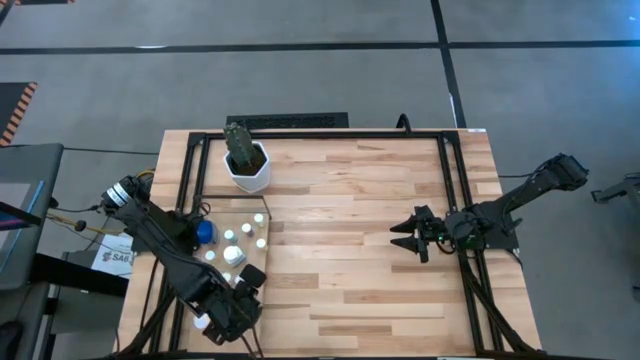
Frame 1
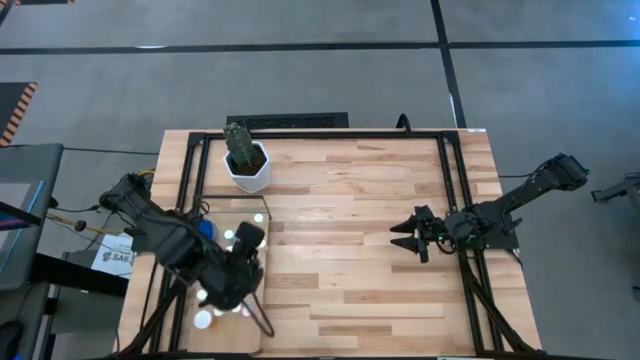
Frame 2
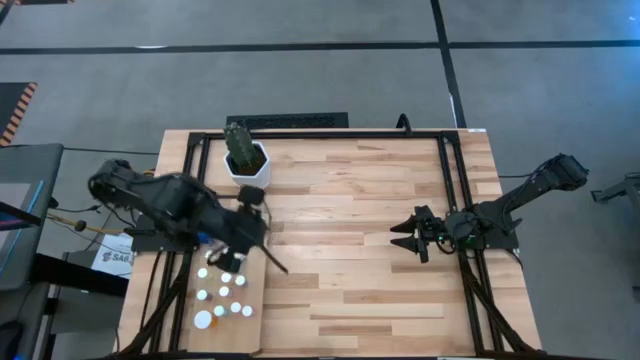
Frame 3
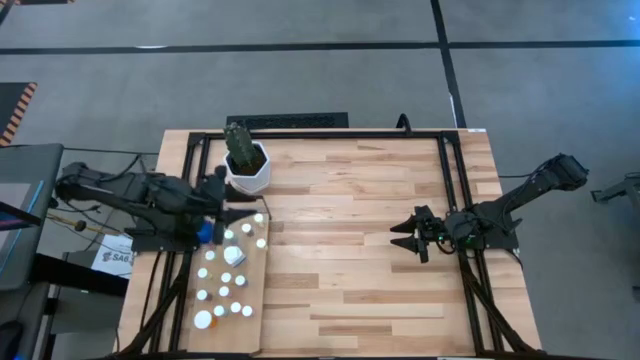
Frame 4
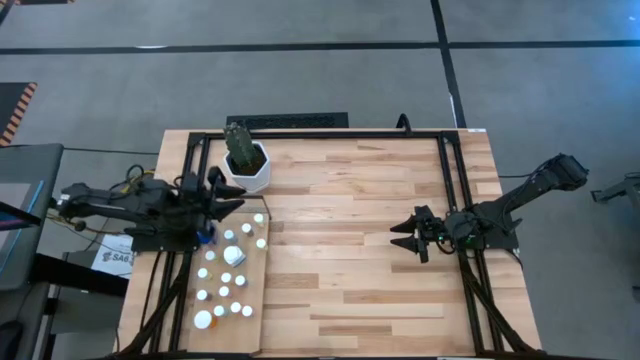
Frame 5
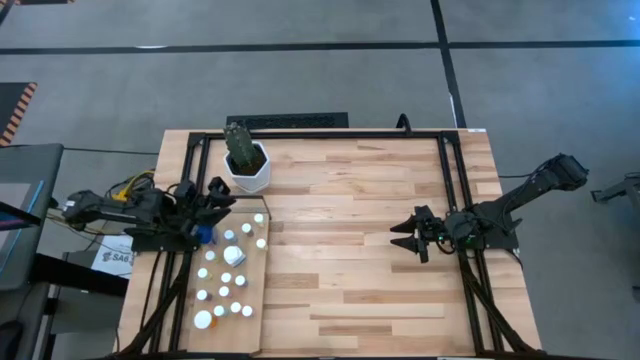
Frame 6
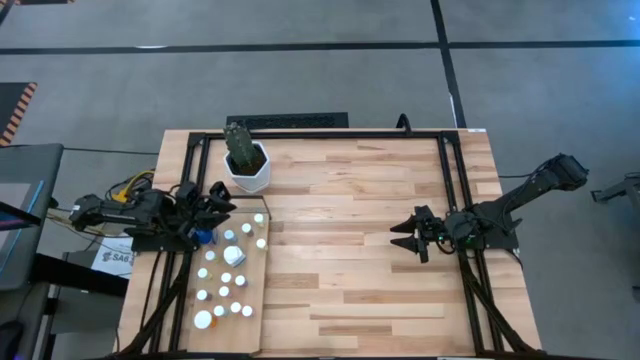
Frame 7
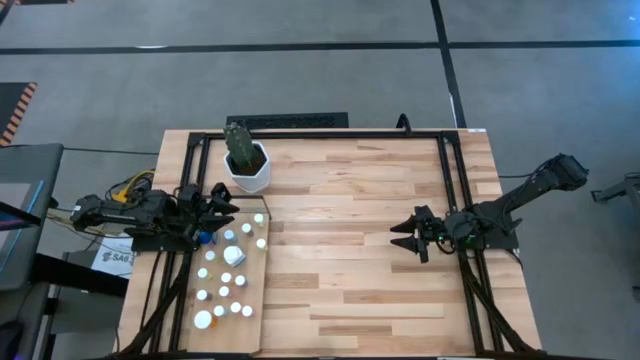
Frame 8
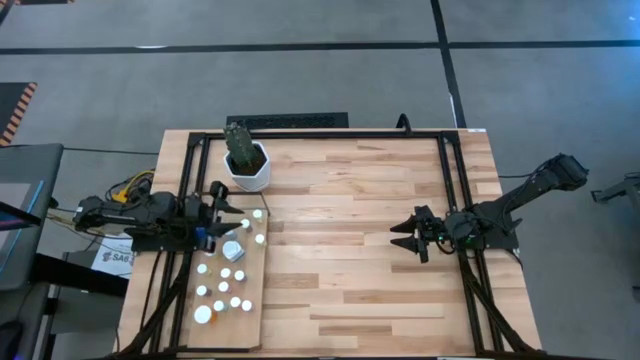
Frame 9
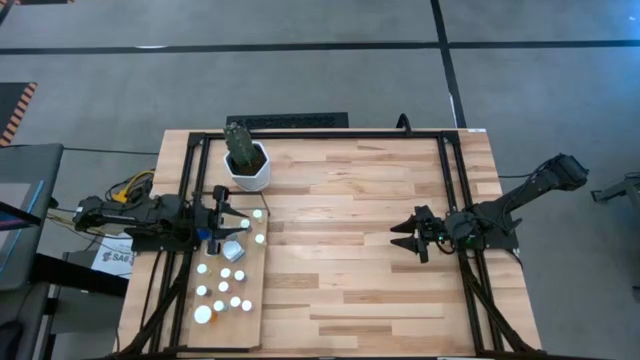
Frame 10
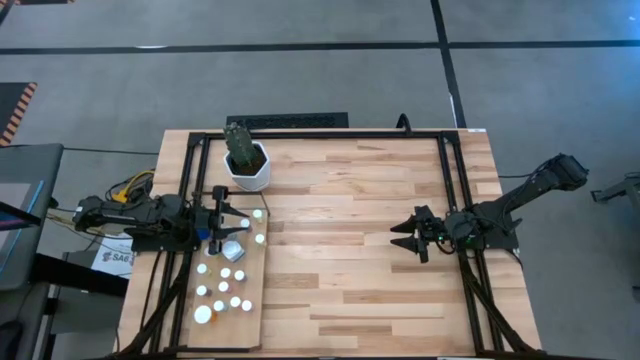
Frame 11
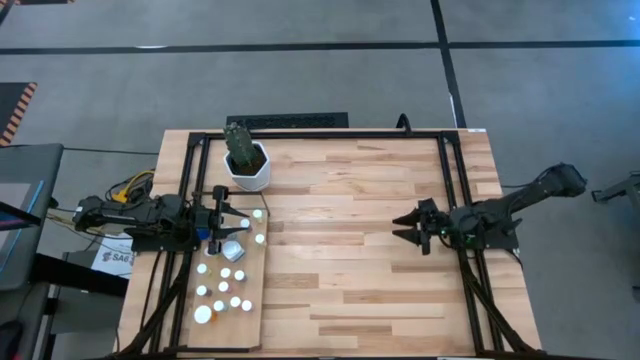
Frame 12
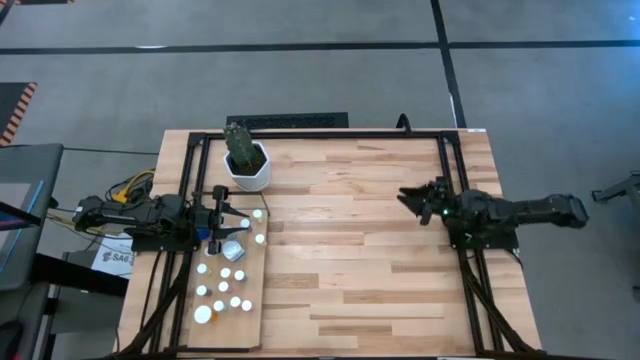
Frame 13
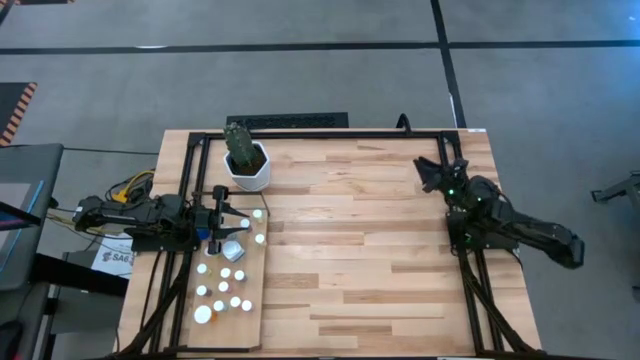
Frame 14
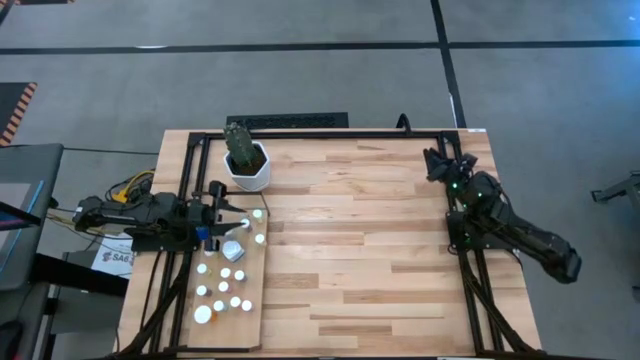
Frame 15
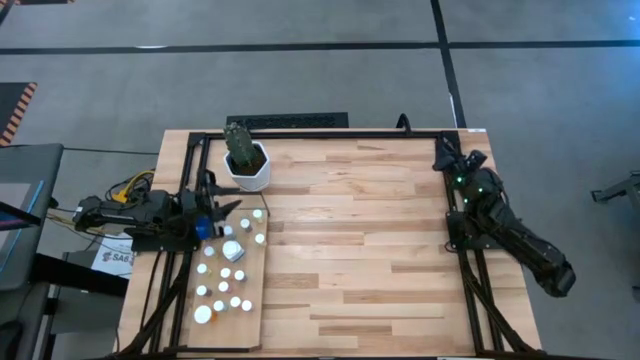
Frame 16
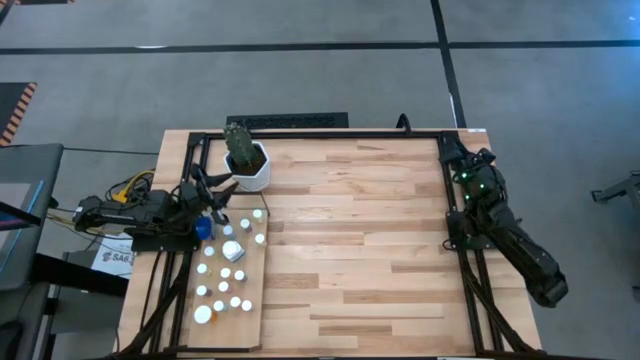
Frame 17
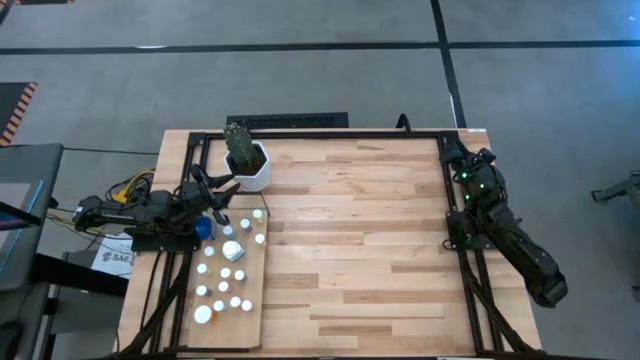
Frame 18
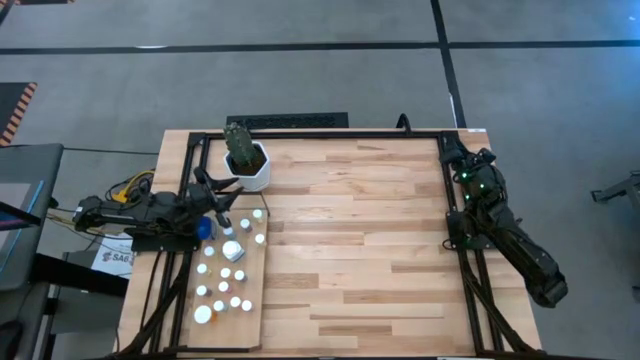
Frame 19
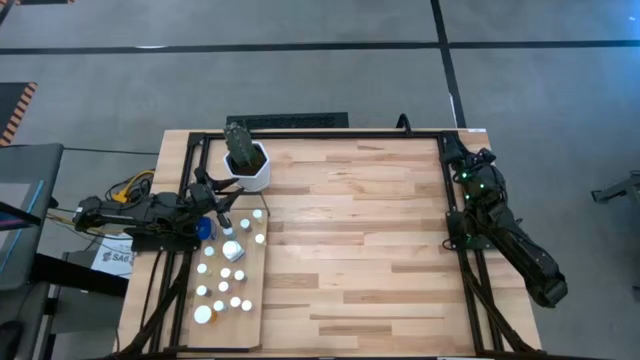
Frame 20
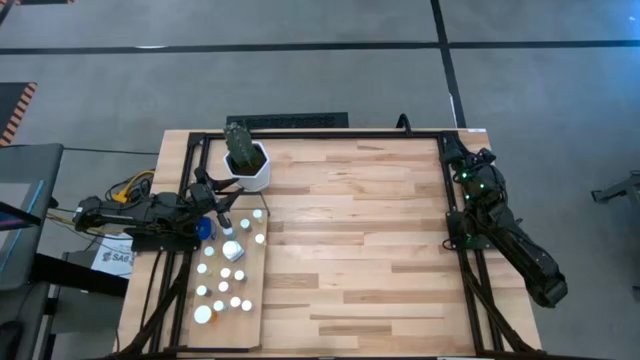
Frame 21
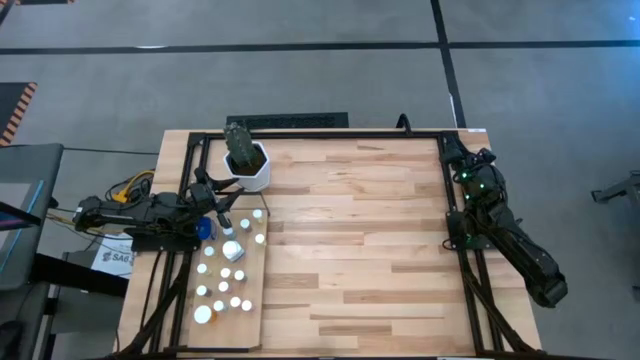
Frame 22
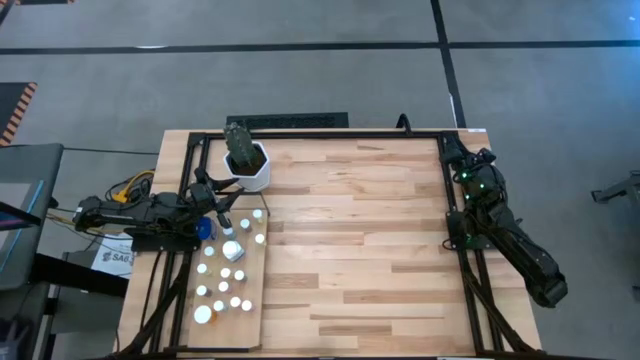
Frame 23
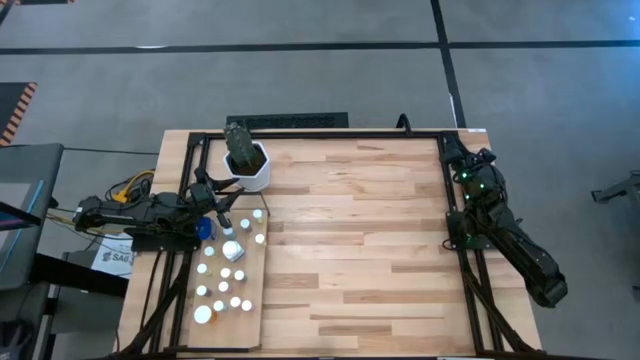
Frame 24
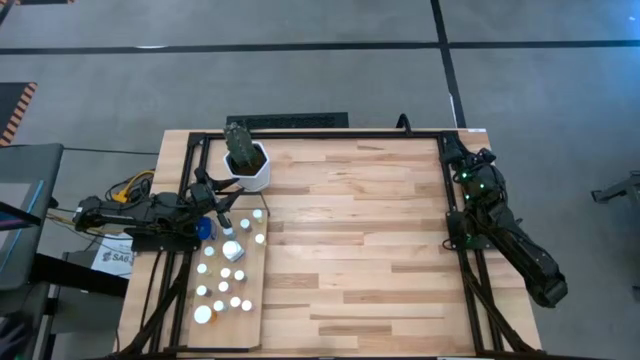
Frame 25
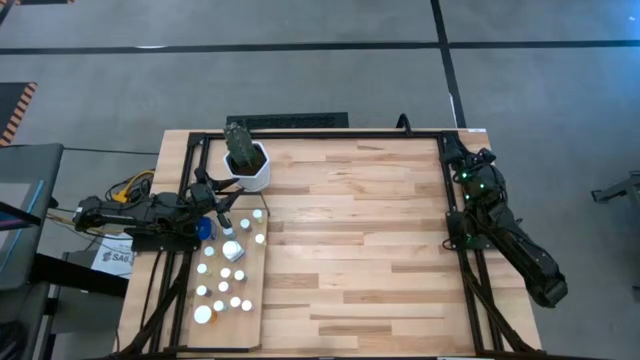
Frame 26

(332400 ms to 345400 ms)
Task: Pick and place medicine bottles onto shelf by color
Return to Home Position
